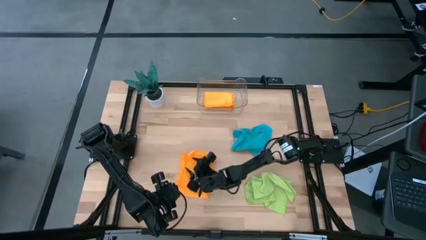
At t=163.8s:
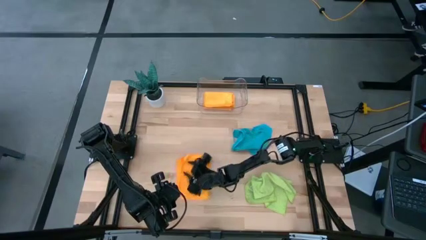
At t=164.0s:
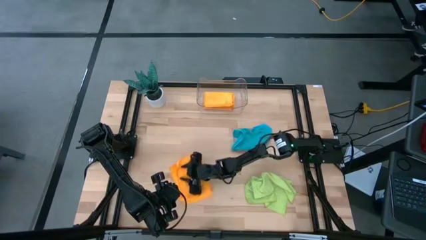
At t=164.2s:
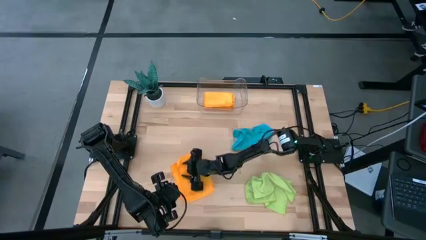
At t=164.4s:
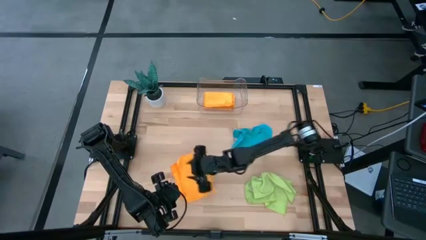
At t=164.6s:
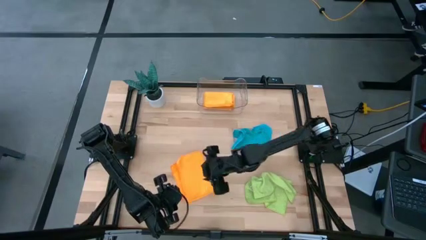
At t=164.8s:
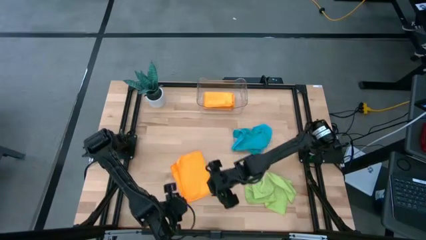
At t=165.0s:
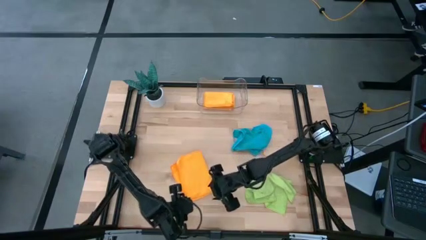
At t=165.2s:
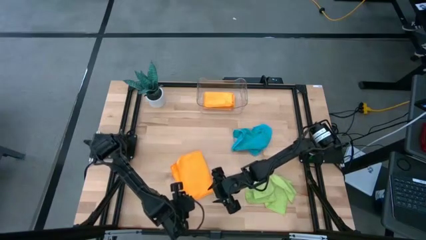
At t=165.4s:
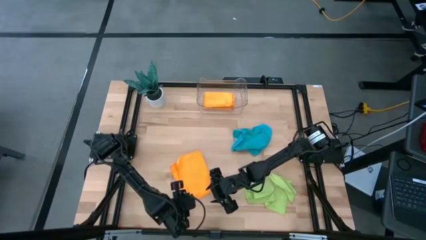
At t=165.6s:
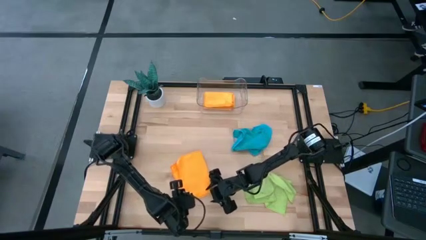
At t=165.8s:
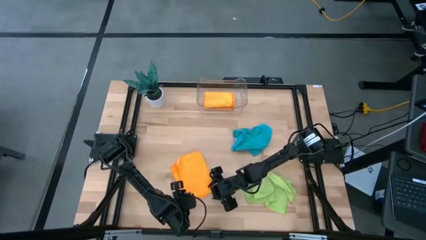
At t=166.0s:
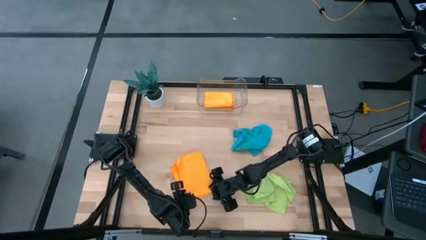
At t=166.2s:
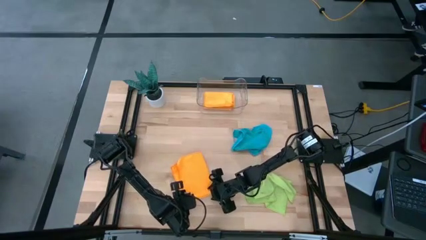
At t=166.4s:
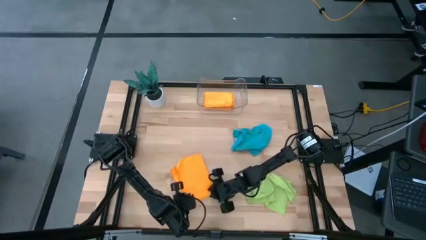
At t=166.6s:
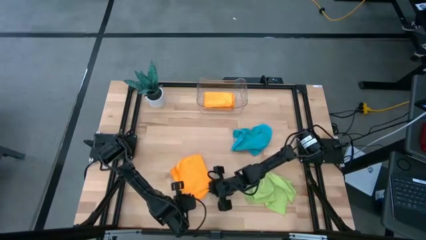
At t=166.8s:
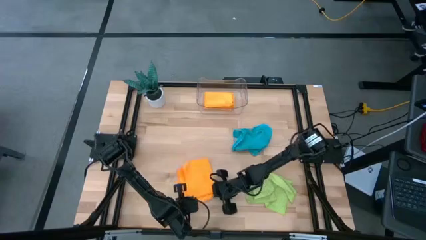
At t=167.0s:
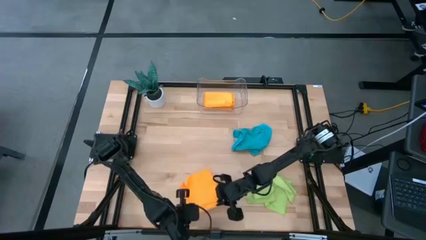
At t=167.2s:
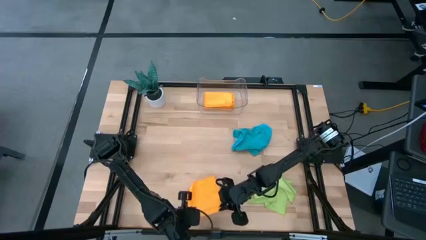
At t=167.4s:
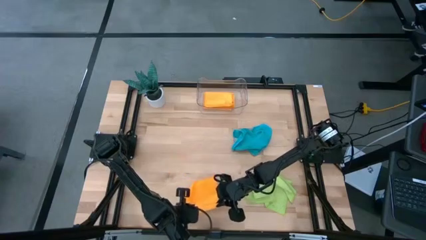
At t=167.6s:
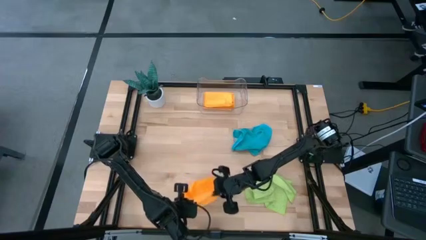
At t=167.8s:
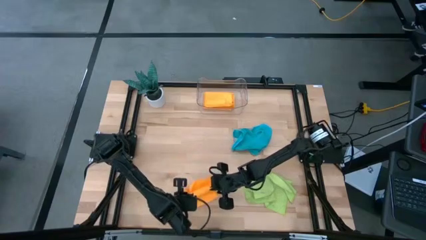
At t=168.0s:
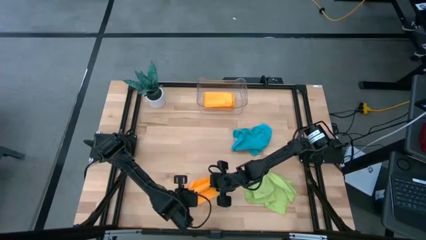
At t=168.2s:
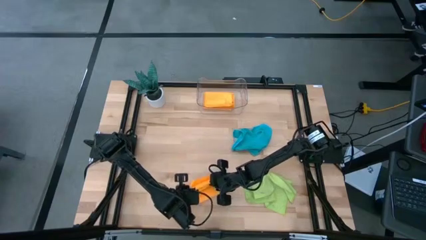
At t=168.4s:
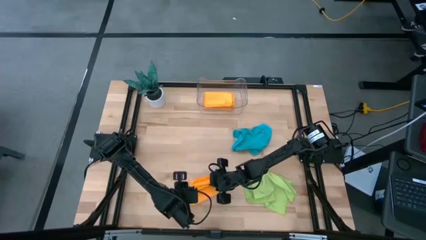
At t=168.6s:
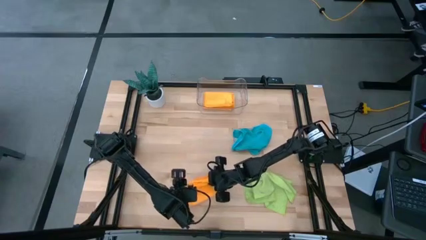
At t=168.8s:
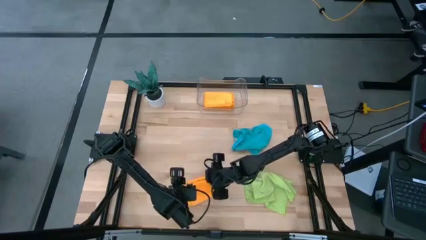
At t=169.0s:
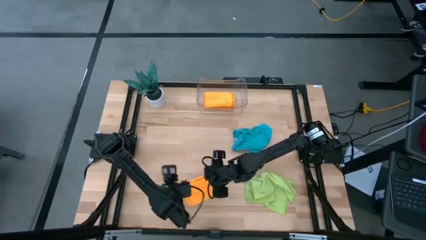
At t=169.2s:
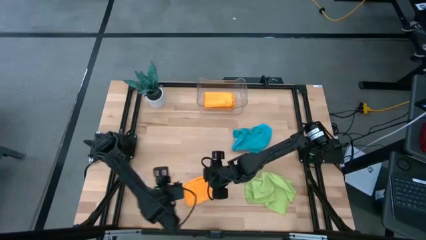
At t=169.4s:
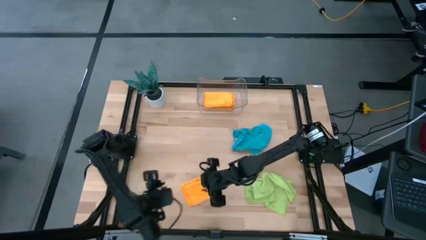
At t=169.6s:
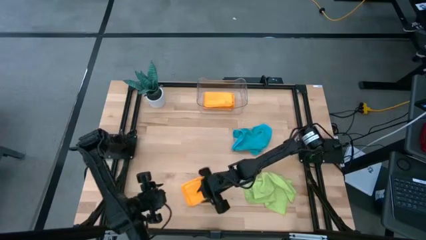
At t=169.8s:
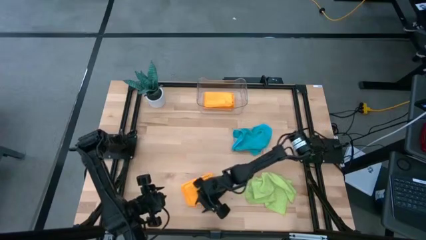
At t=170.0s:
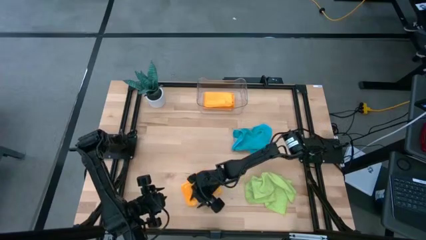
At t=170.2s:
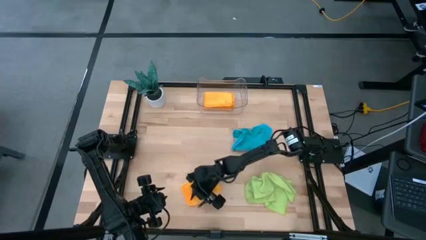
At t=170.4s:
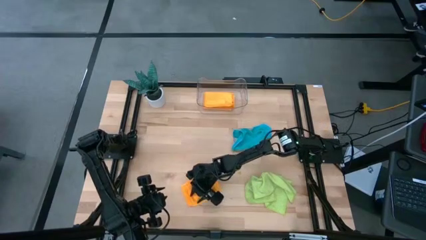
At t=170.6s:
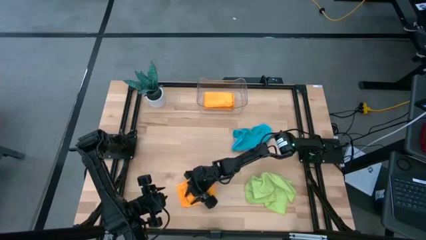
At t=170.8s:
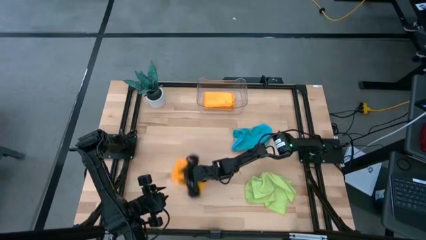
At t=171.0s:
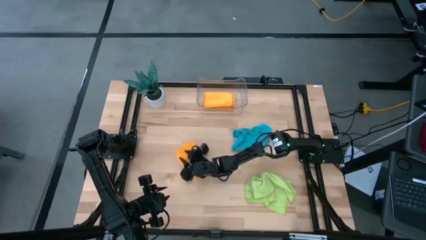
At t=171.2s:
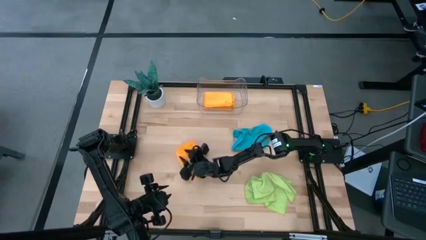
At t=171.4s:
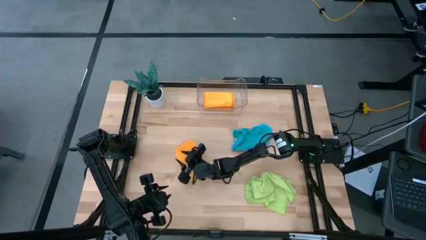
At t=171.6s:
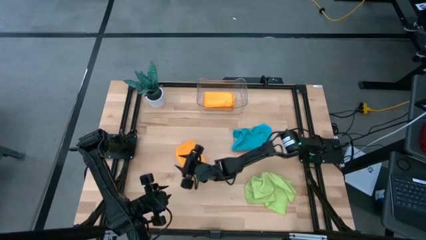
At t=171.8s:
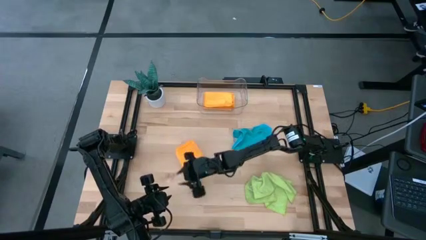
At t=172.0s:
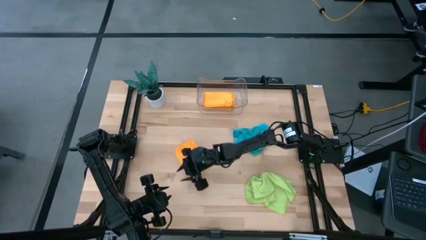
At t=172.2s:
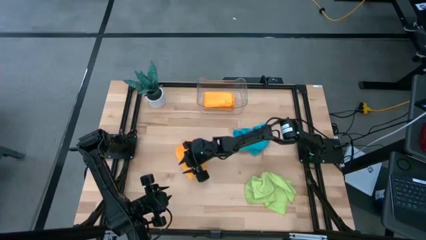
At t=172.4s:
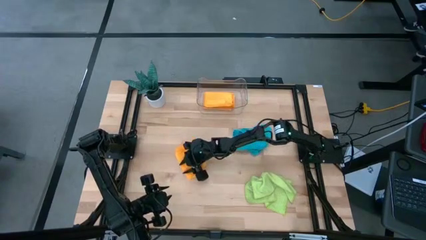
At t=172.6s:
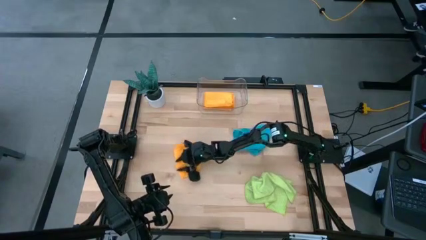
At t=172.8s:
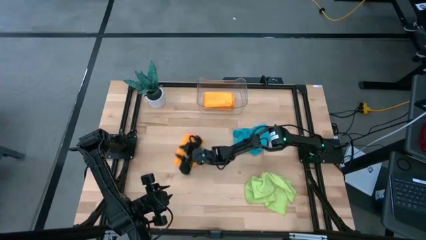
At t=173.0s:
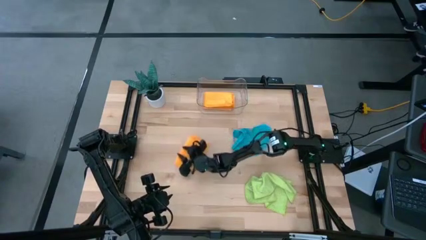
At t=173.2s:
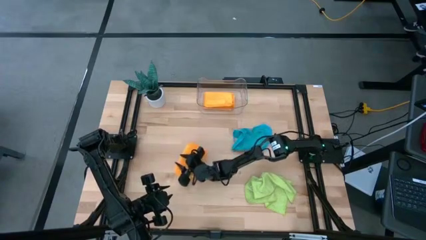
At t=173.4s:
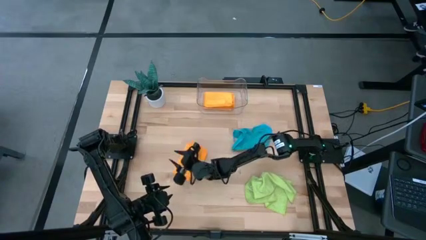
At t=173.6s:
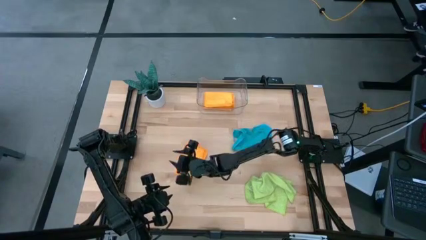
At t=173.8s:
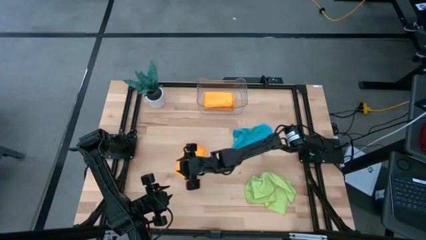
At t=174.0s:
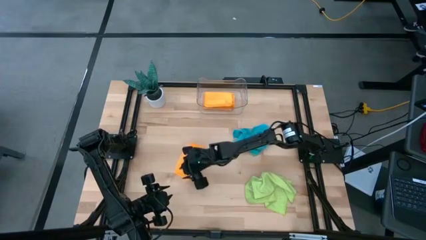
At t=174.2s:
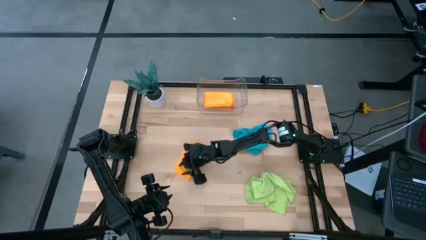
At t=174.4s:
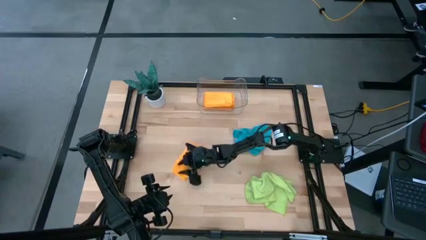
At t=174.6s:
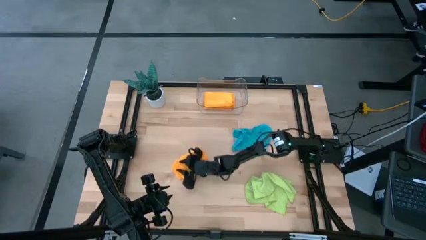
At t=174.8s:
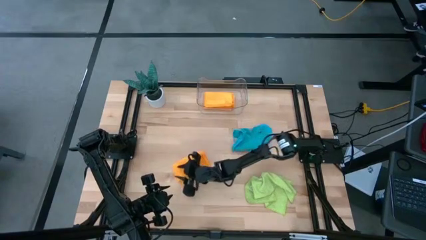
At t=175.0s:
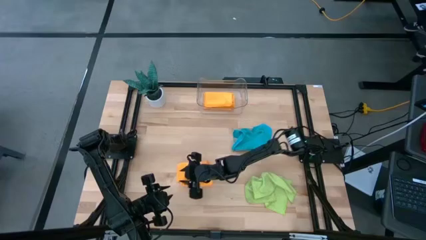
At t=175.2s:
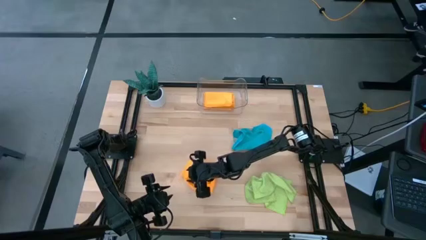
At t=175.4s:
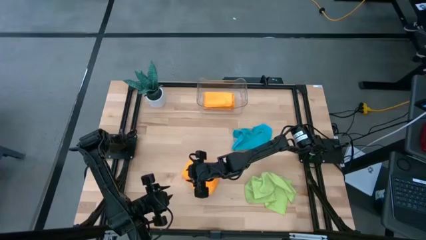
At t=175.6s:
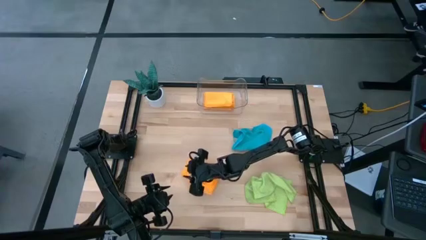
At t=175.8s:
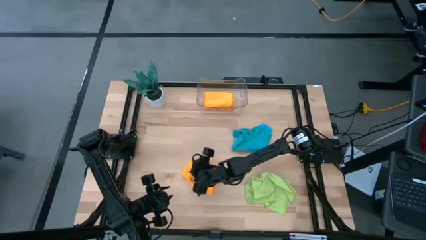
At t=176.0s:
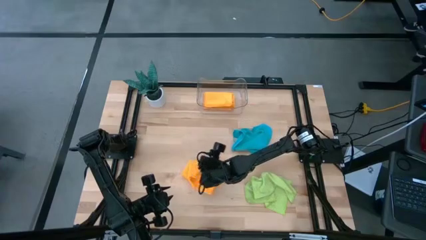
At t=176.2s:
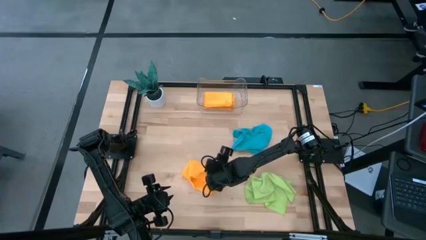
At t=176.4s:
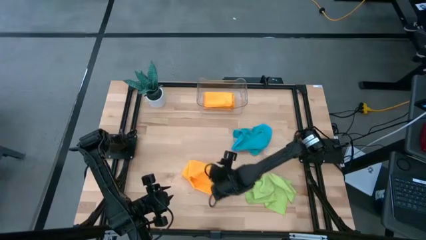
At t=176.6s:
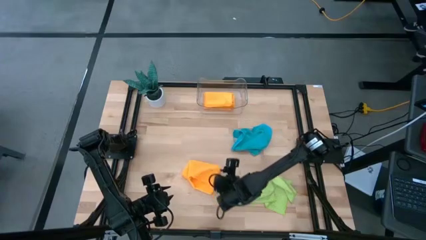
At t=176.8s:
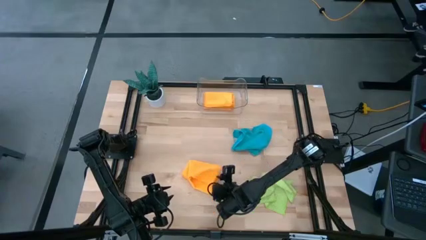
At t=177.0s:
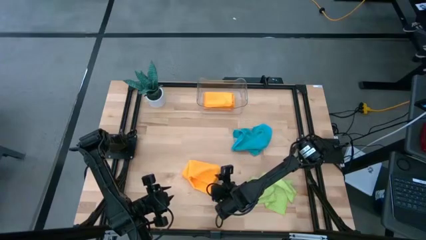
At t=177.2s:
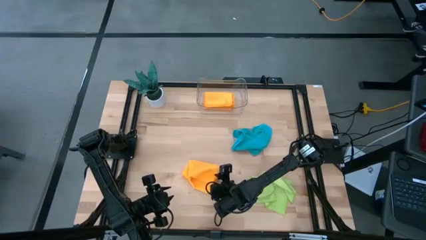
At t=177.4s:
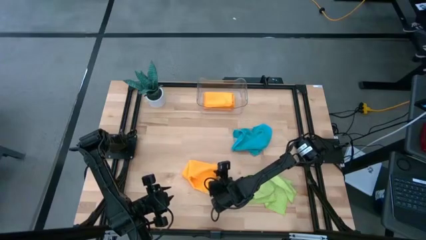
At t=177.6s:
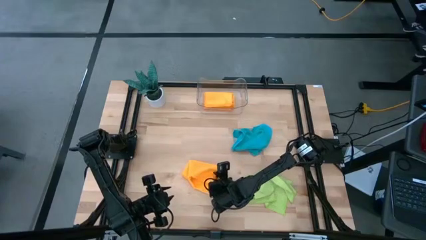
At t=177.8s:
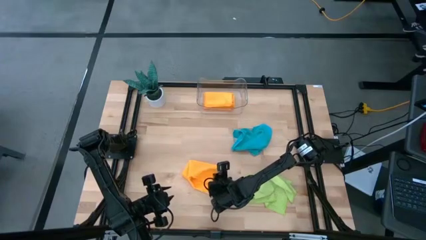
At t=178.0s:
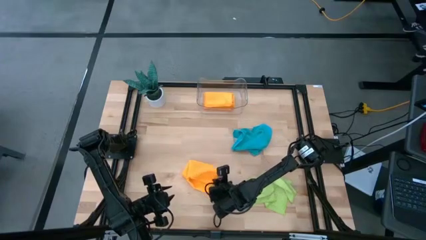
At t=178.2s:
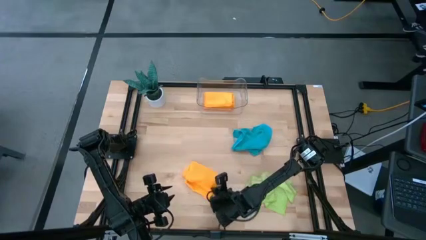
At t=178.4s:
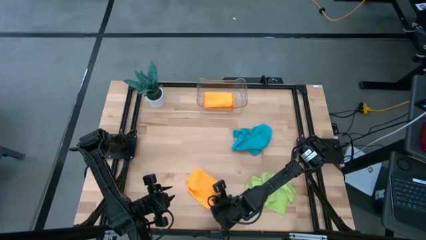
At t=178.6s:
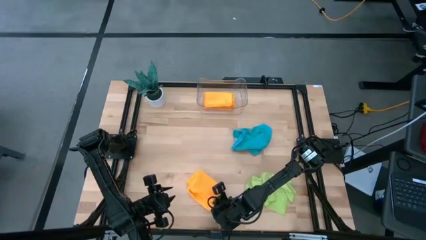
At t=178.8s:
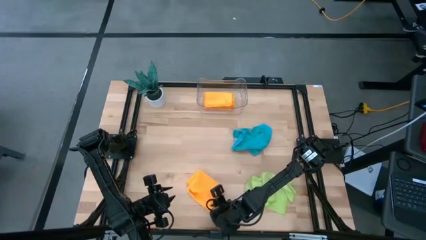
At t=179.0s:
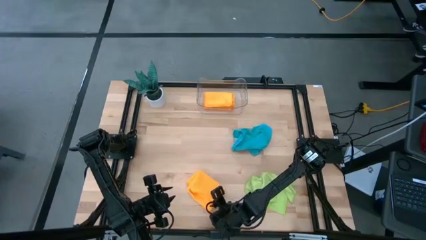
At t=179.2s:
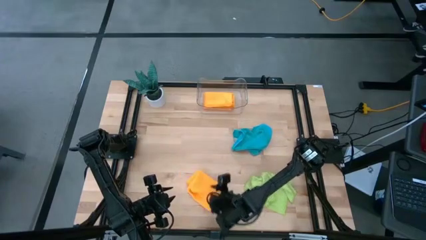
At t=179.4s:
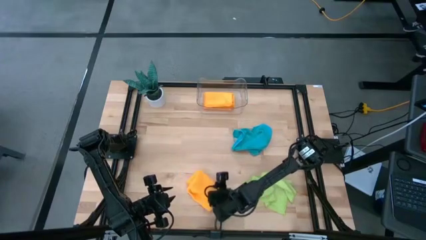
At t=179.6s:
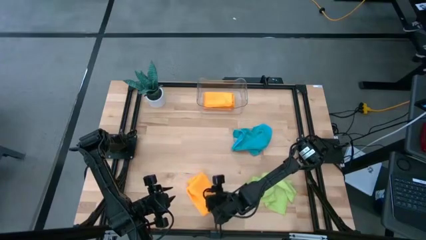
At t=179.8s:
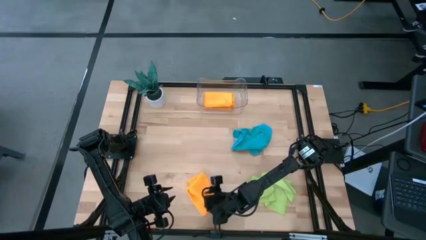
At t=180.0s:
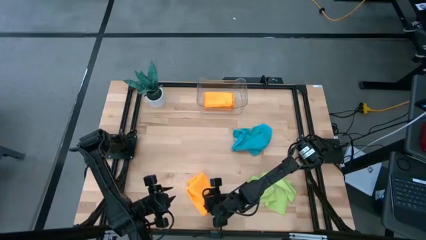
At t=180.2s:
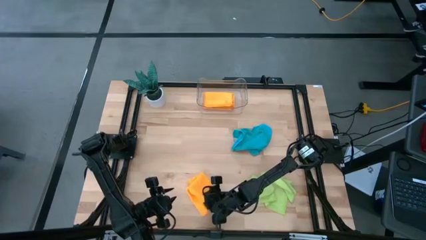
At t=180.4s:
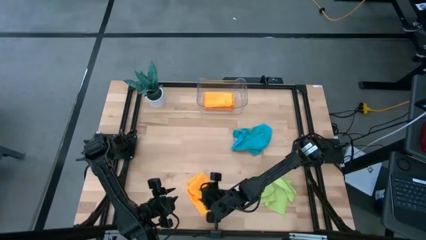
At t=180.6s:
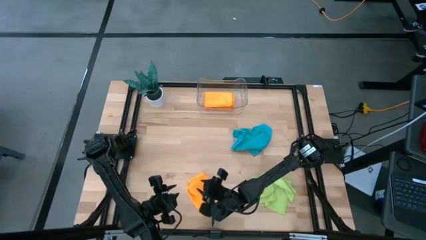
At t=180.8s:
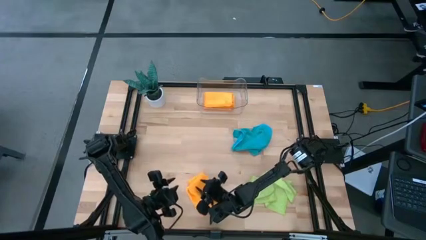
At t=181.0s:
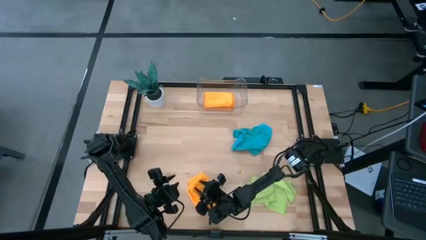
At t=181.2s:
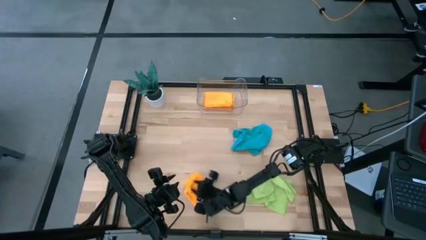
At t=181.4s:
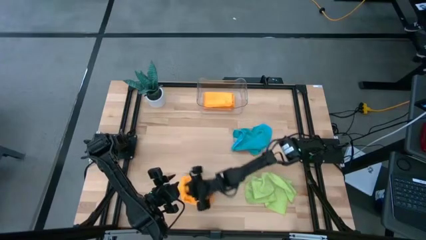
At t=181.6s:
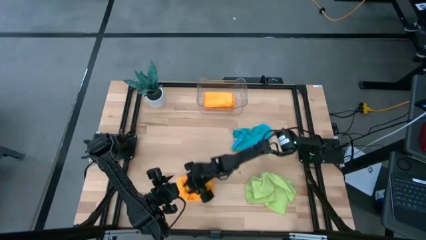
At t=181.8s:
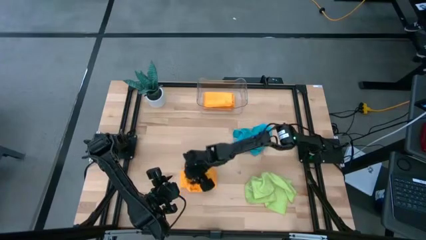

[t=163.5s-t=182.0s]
Task: Fold microfiber towels
Fold the orange microfiber towel
